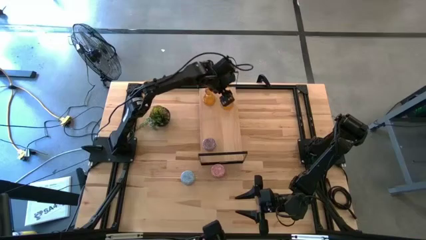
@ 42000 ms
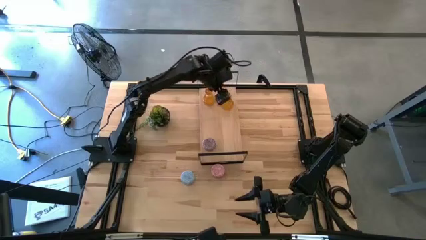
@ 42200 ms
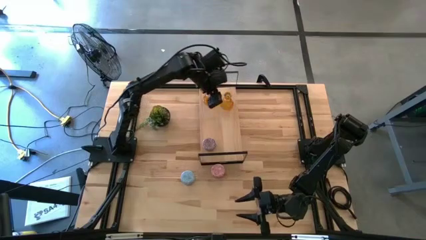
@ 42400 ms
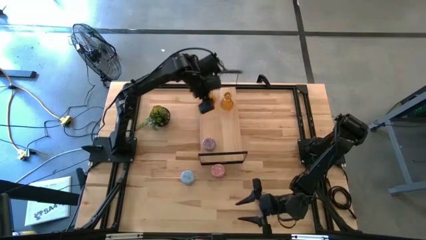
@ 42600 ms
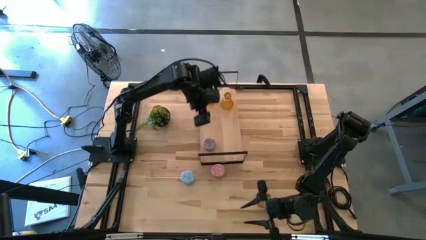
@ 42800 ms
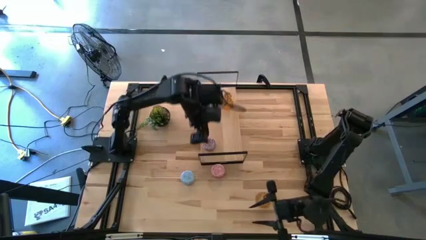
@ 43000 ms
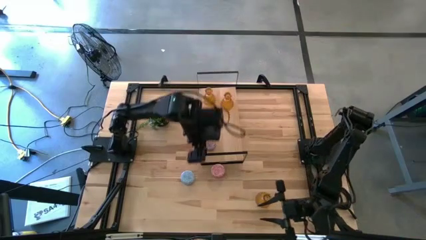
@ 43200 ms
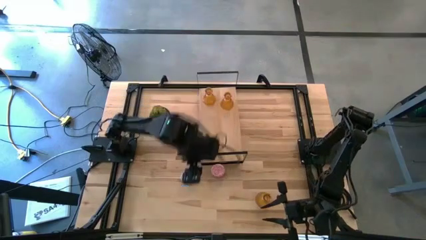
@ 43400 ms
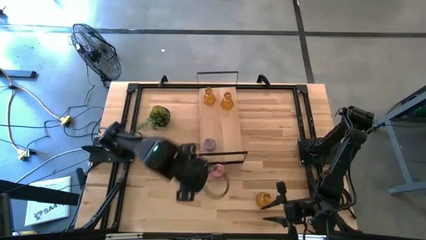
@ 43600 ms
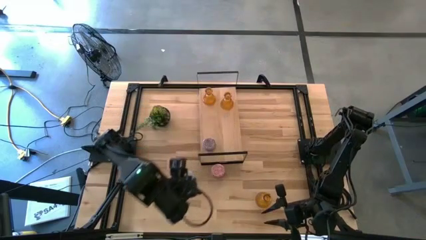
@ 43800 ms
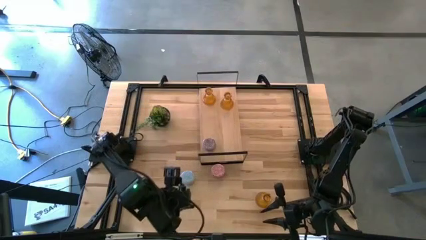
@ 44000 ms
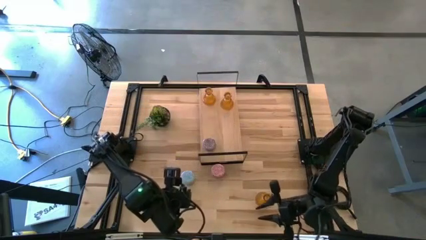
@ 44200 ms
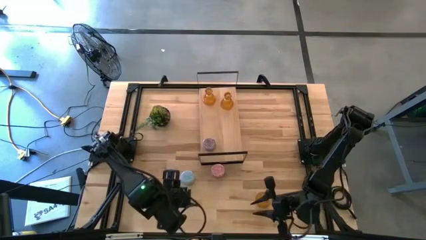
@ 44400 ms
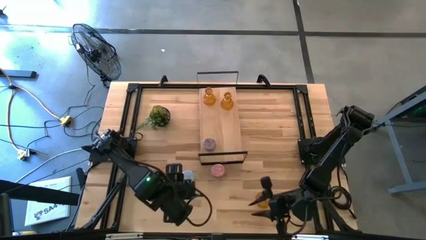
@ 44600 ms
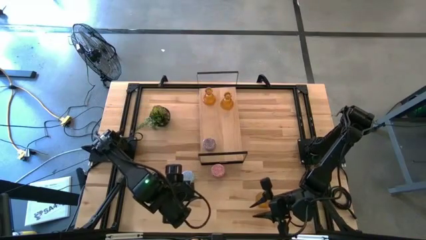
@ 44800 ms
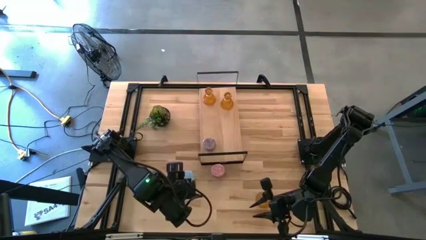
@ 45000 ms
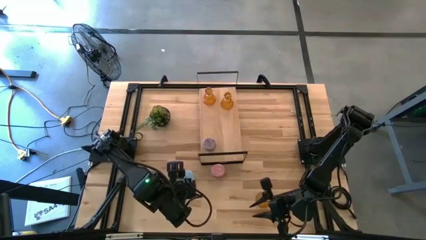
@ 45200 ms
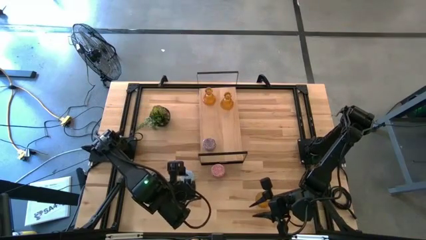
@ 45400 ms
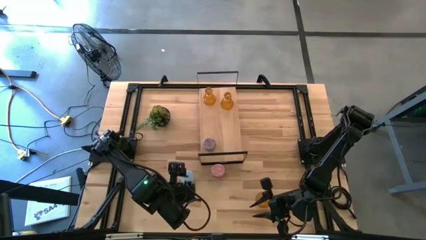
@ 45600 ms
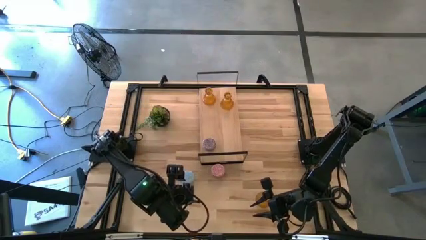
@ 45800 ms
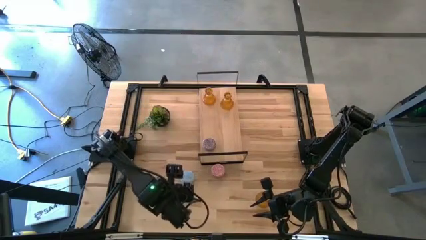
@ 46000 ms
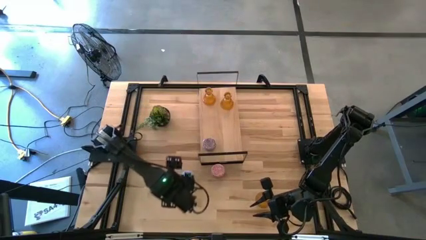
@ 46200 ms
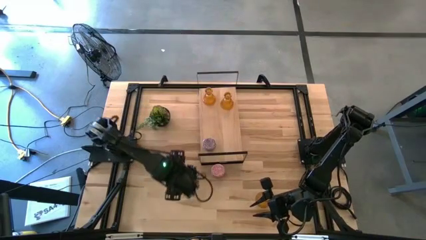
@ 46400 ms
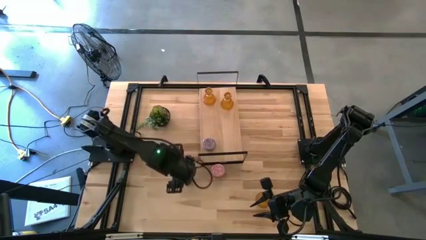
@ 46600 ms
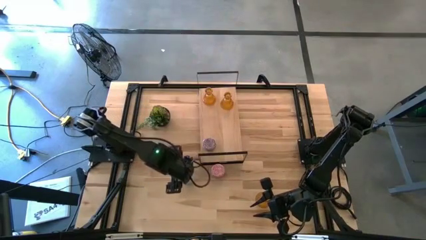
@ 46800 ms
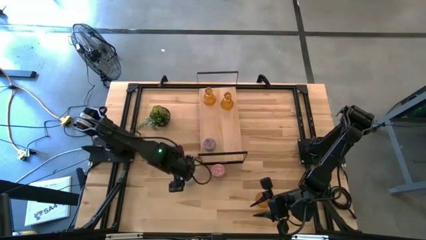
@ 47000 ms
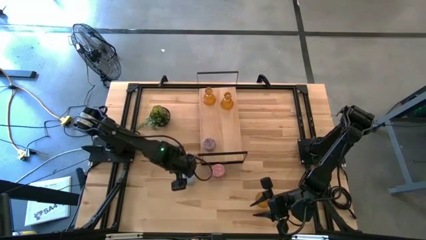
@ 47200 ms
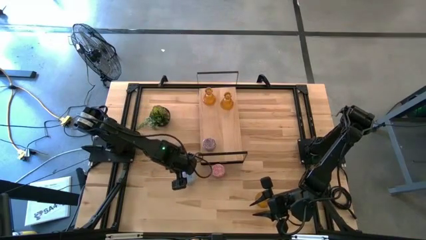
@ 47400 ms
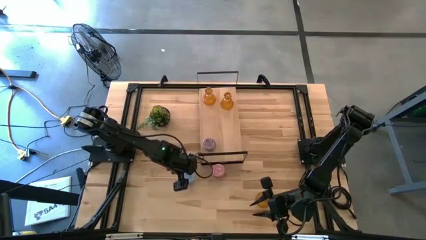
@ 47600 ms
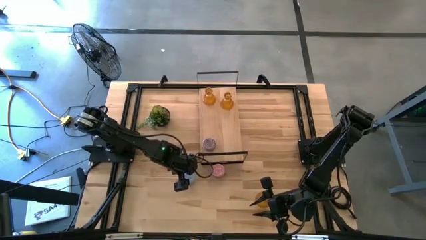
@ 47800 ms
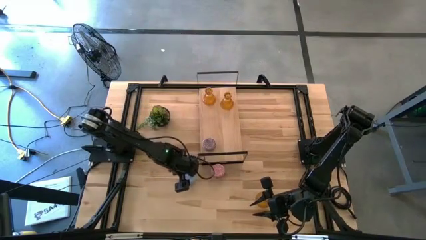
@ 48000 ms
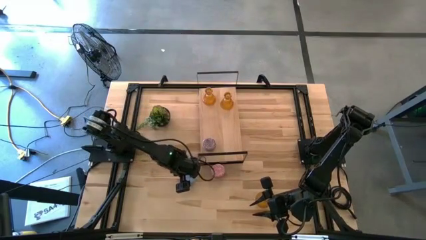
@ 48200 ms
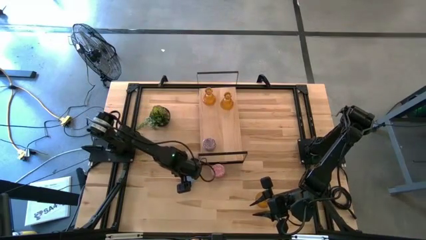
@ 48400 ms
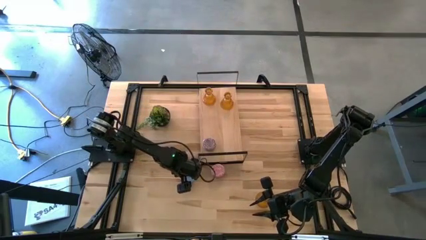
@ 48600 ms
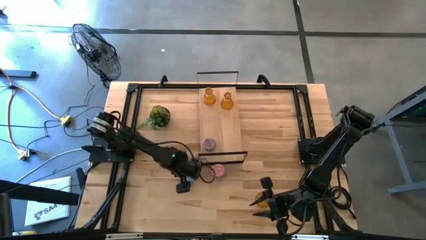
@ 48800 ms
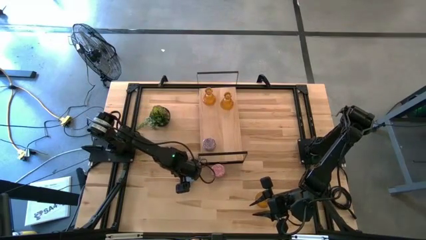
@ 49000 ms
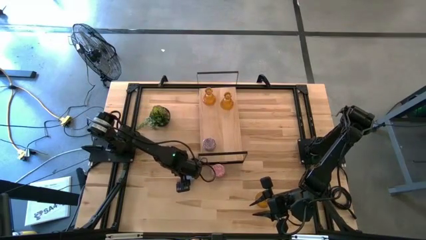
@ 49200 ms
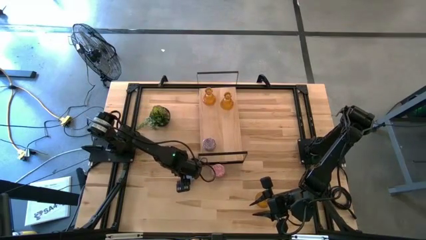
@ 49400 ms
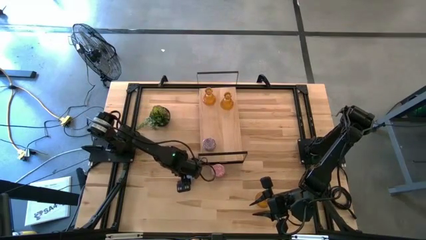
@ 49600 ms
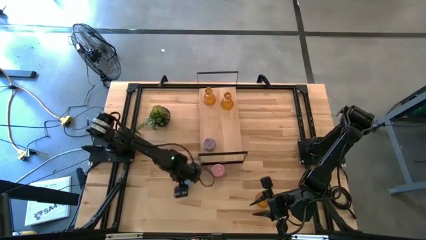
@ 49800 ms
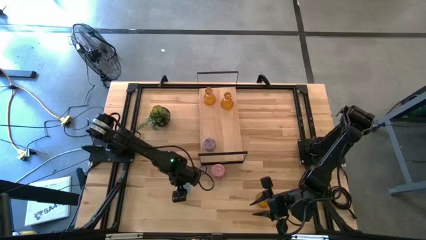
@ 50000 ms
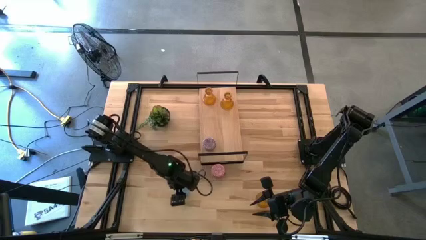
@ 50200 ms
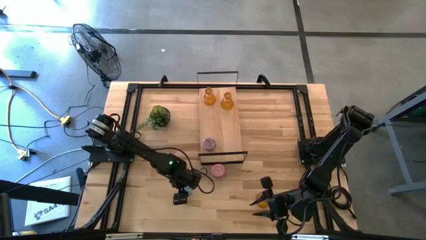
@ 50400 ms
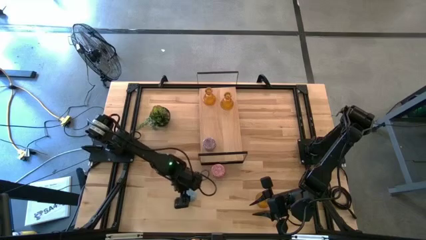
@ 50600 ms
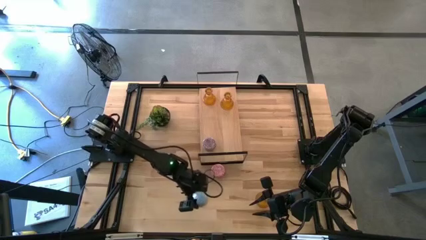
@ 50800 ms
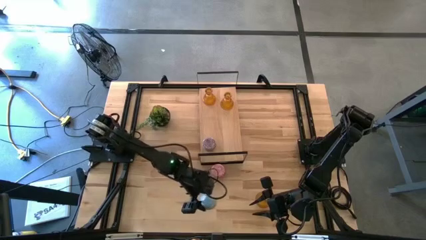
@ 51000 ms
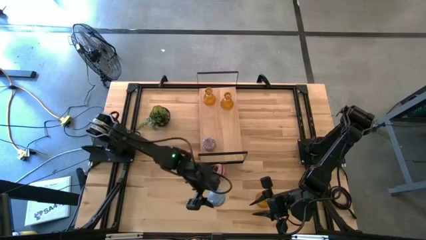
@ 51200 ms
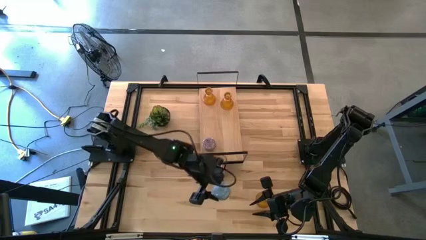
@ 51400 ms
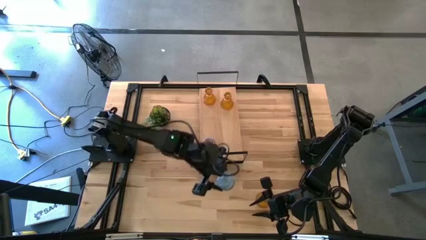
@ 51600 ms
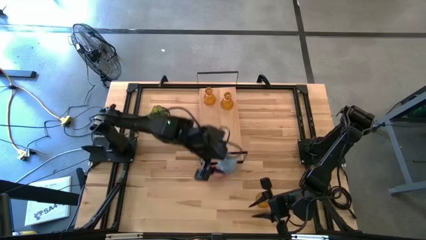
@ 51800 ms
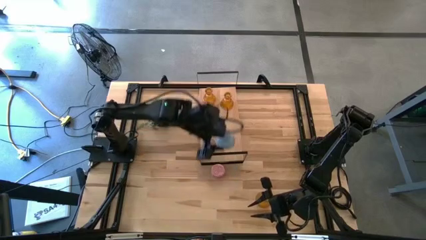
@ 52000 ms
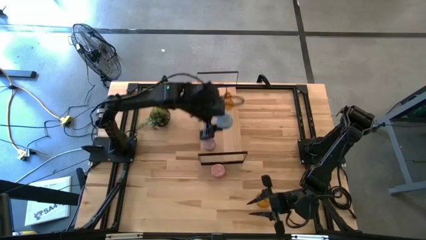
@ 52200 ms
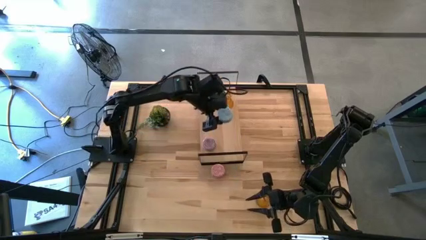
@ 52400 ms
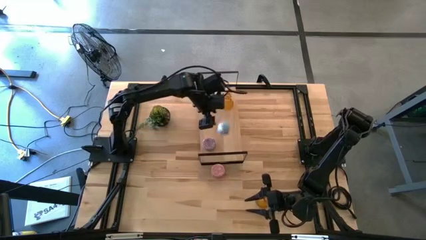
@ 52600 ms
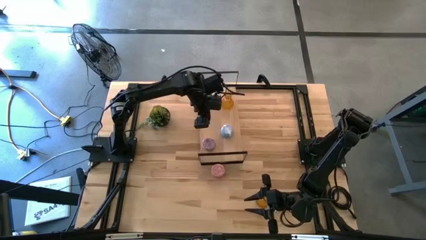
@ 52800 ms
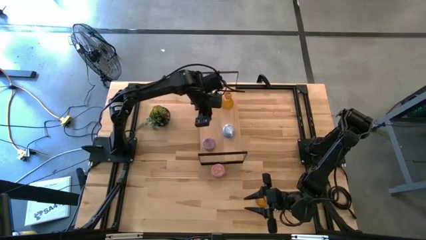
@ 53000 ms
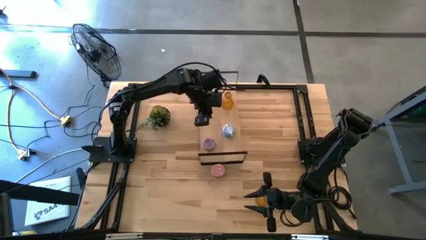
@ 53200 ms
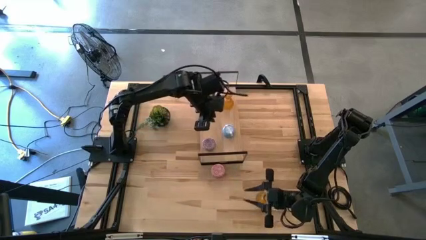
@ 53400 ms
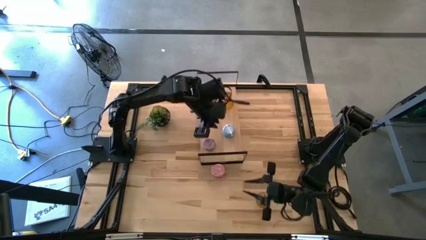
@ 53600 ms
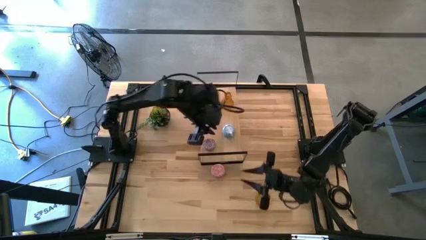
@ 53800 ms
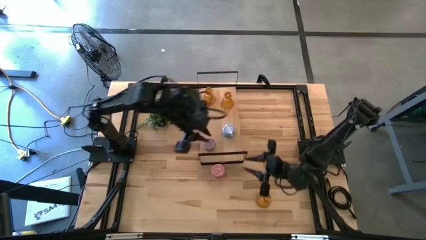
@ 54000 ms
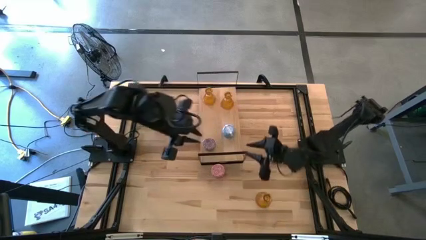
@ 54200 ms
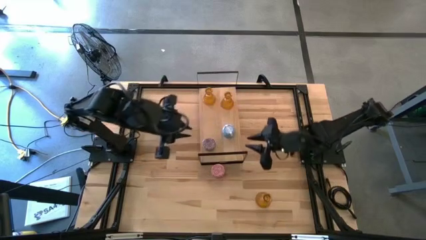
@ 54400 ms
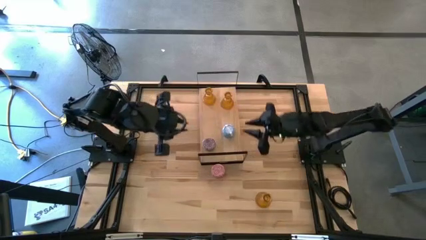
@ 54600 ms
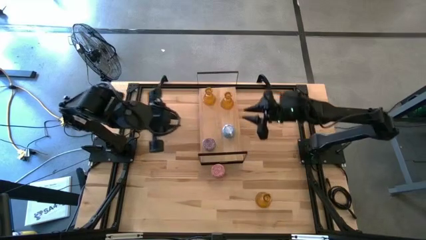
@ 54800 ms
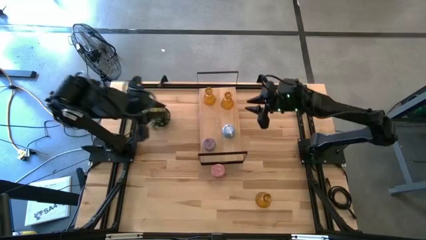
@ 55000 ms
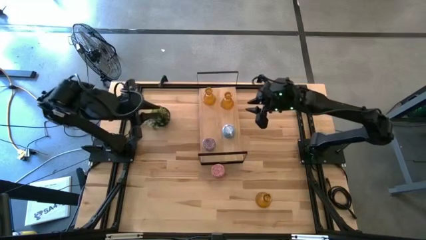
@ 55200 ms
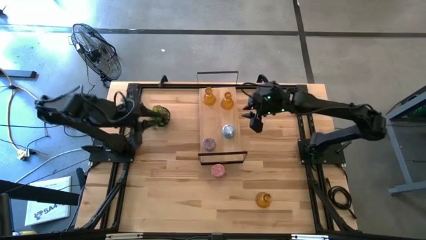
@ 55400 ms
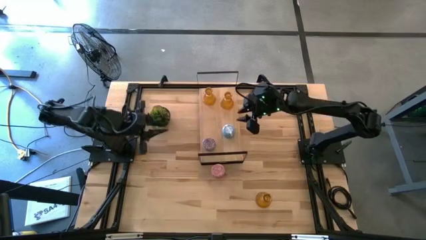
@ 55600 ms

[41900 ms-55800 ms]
Task: Pick & Place candle stick holders
Put the blue scented candle on the shelf
